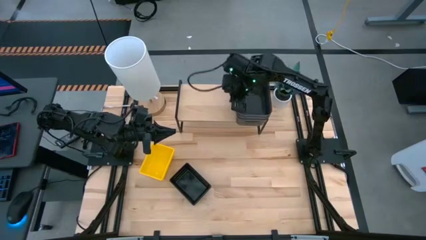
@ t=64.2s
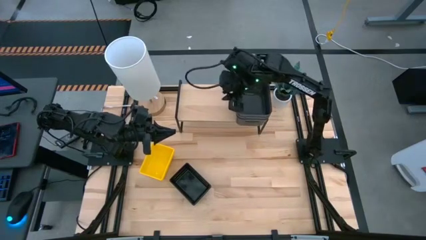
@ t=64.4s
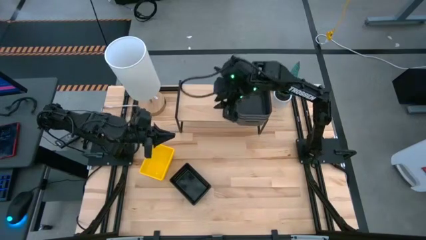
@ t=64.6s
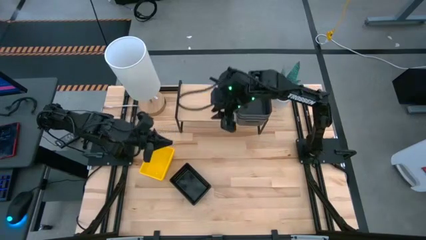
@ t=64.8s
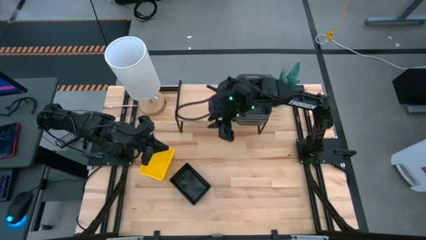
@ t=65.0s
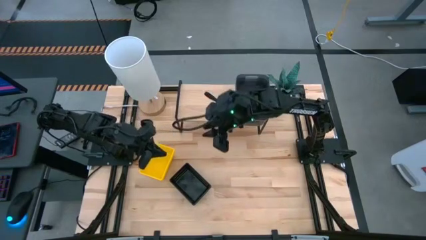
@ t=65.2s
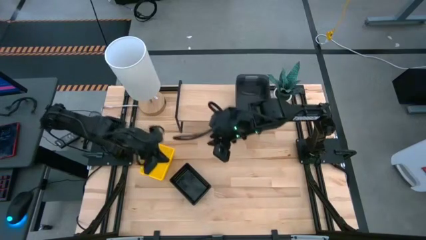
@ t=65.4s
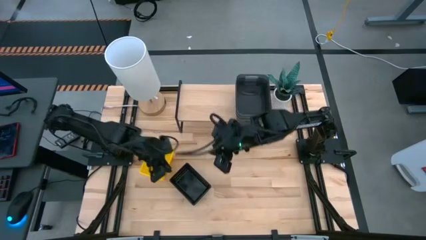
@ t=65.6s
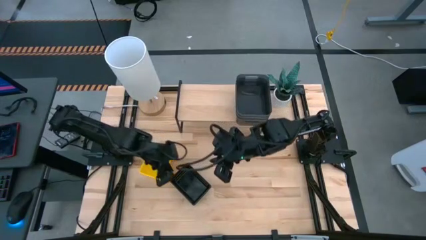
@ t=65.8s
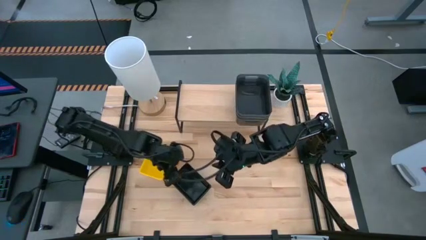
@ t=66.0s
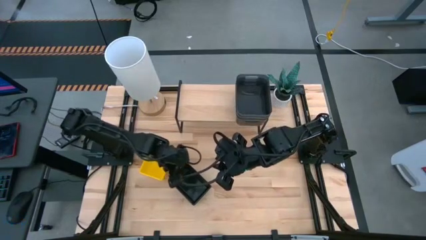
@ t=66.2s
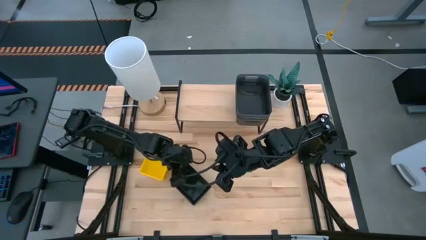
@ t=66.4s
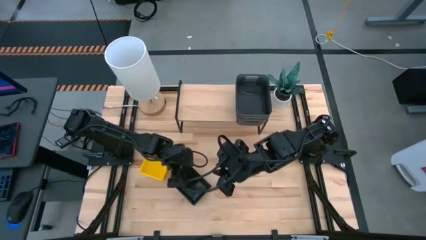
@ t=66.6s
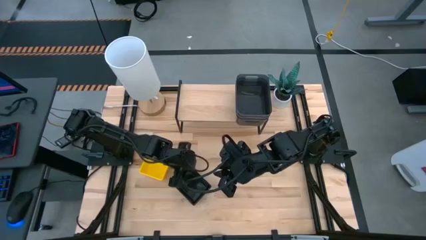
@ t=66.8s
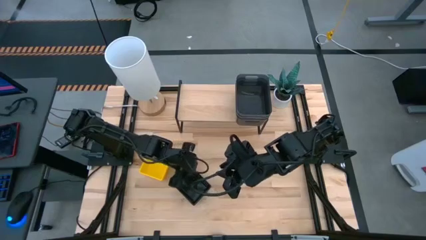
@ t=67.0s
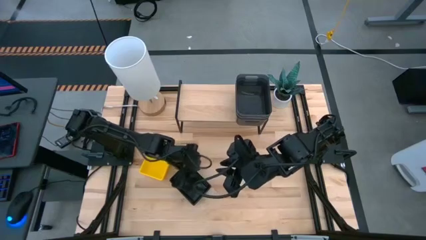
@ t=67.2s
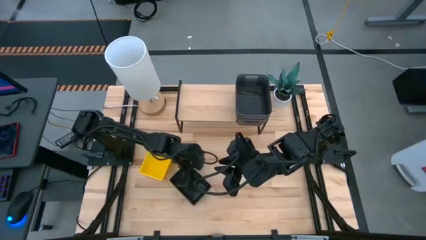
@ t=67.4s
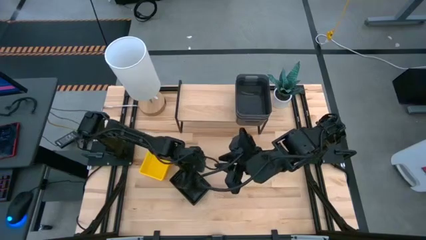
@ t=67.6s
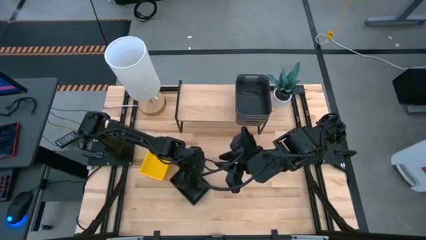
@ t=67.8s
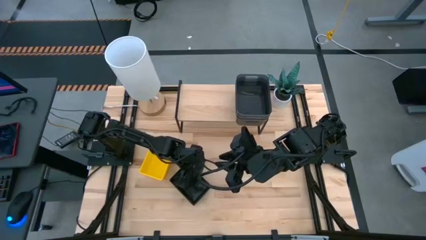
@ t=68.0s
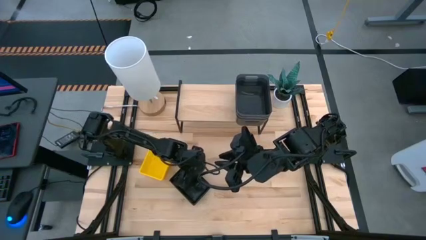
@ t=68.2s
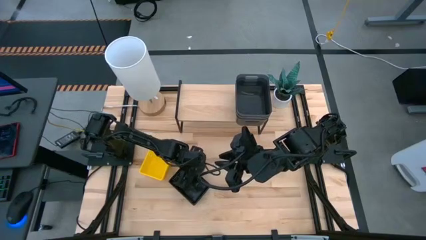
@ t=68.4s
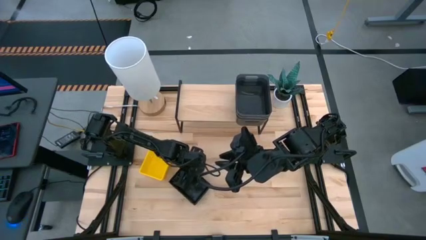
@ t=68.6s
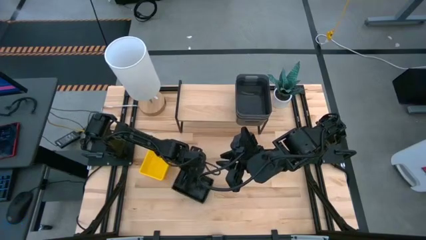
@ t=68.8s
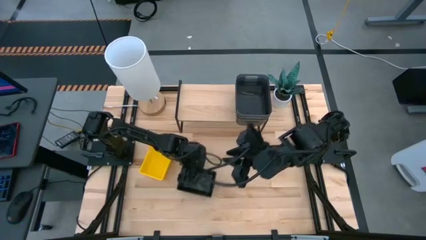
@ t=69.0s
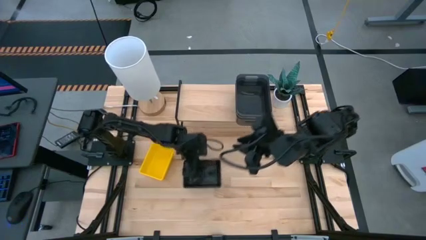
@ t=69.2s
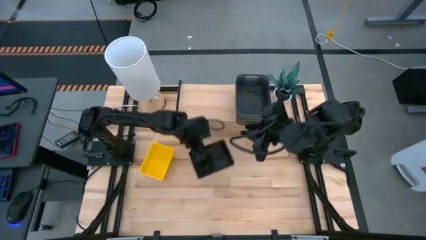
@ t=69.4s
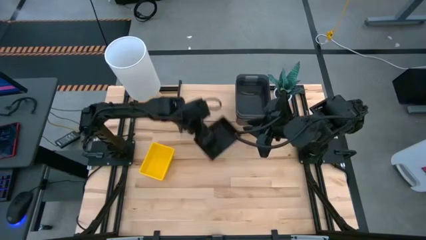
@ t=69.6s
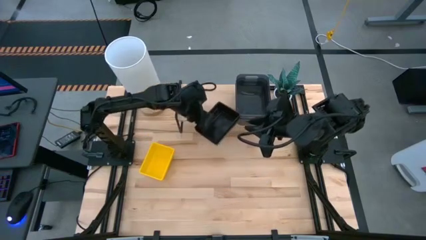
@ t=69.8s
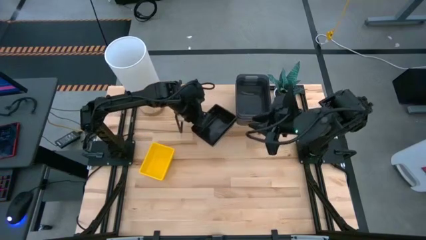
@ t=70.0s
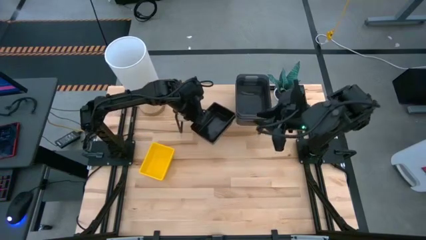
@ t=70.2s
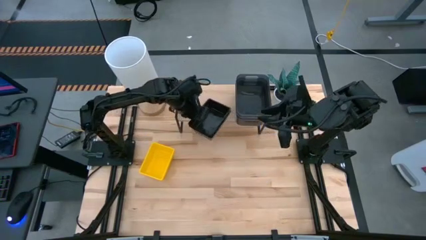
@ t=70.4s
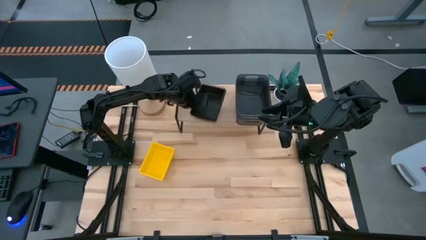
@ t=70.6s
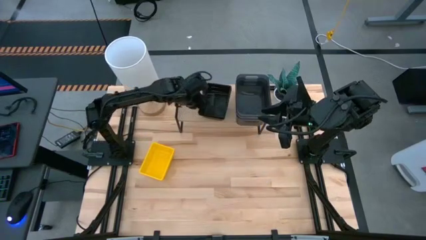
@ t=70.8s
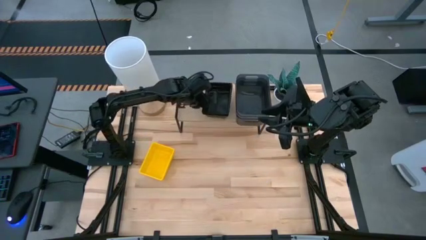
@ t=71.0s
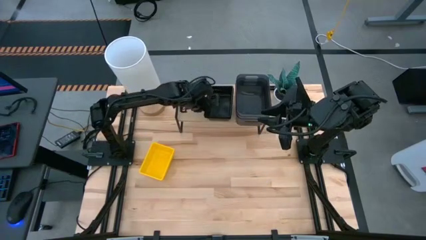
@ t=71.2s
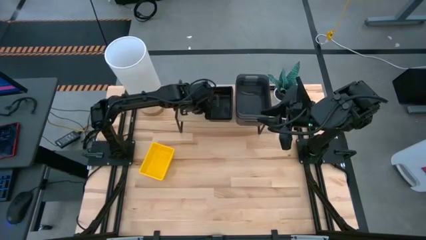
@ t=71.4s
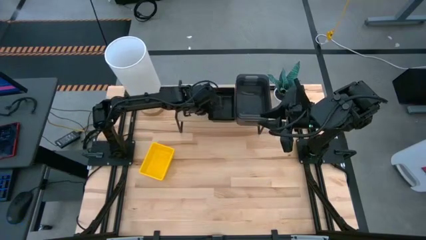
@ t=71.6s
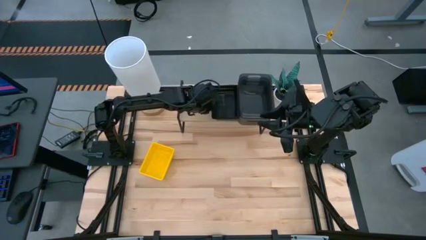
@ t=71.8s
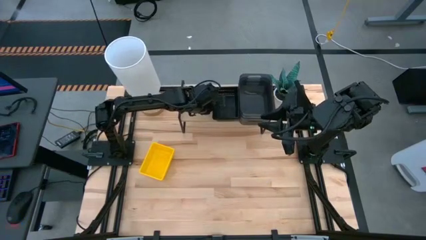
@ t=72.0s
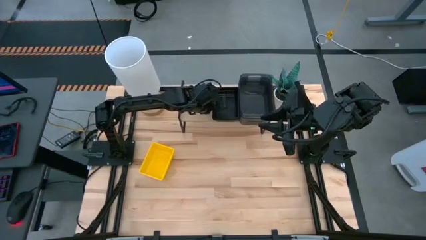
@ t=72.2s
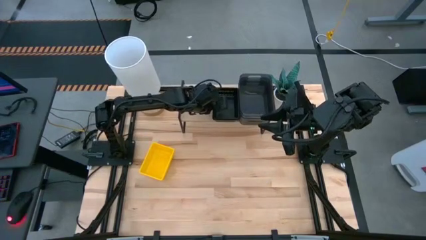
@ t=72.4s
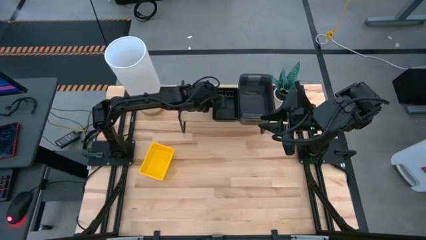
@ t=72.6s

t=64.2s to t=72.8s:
Task: Stack baskets on shelf by color
Put the stacked black bins on the shelf

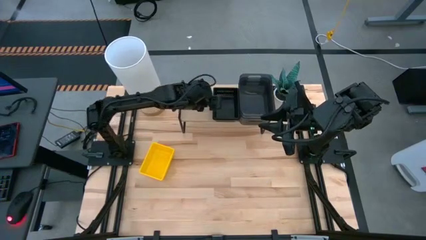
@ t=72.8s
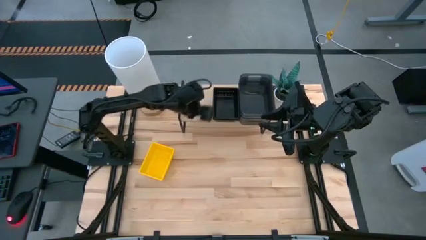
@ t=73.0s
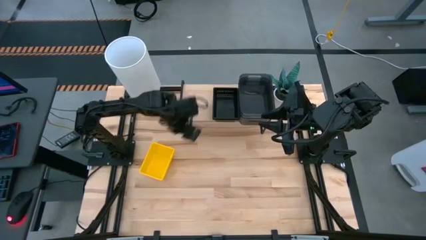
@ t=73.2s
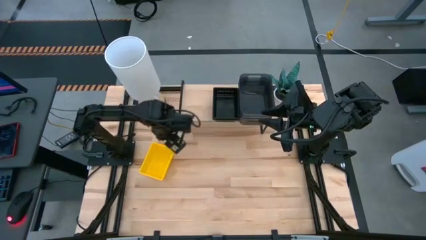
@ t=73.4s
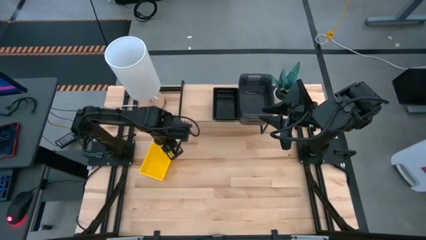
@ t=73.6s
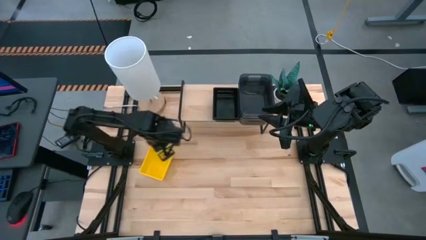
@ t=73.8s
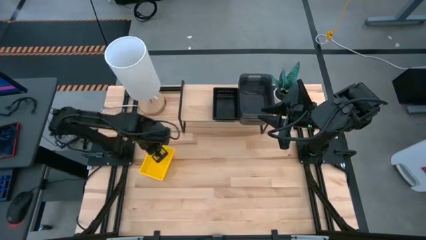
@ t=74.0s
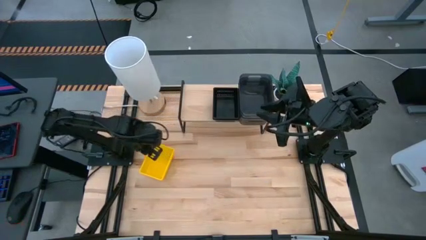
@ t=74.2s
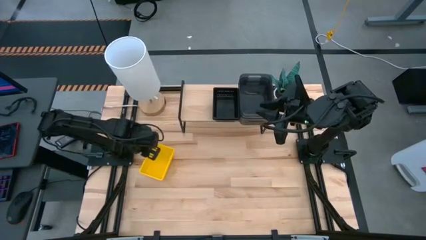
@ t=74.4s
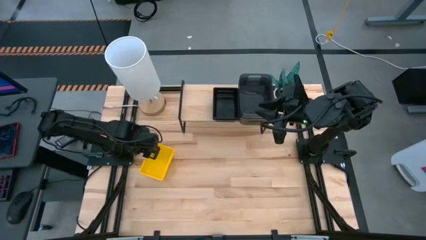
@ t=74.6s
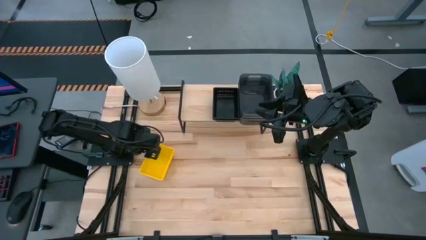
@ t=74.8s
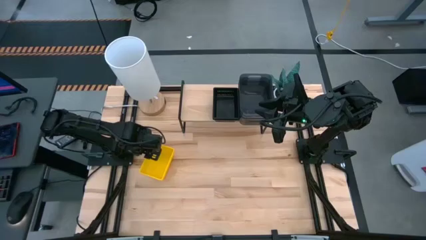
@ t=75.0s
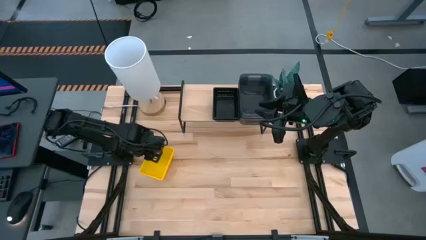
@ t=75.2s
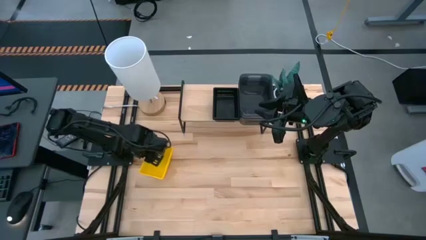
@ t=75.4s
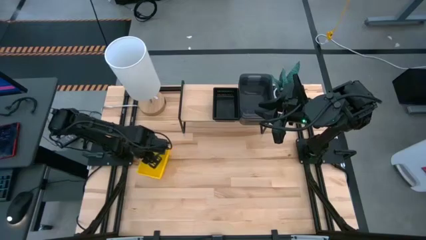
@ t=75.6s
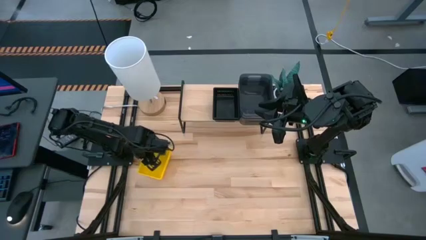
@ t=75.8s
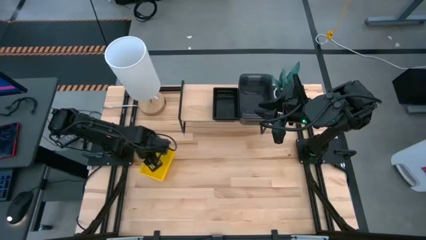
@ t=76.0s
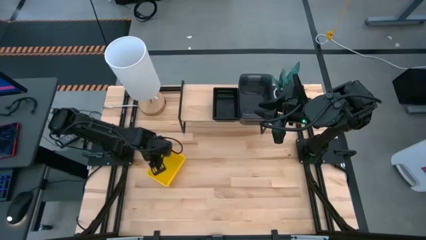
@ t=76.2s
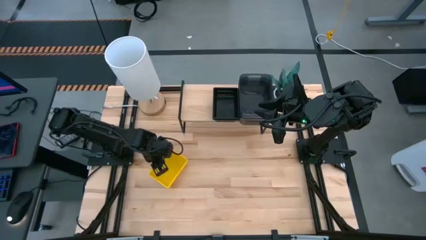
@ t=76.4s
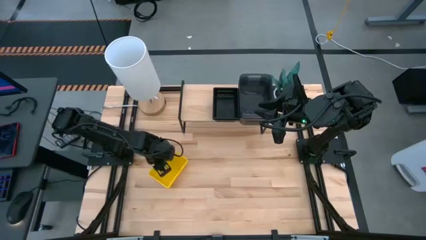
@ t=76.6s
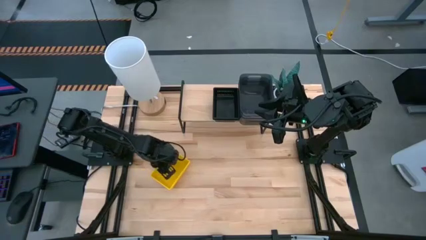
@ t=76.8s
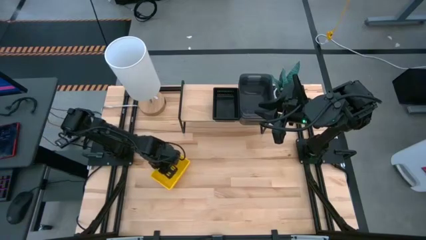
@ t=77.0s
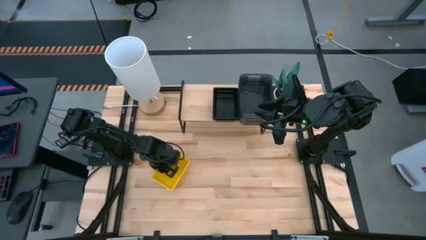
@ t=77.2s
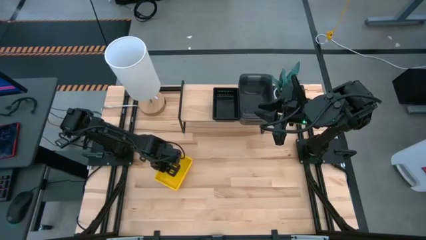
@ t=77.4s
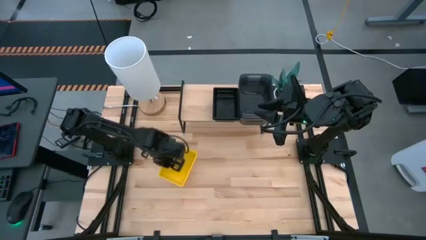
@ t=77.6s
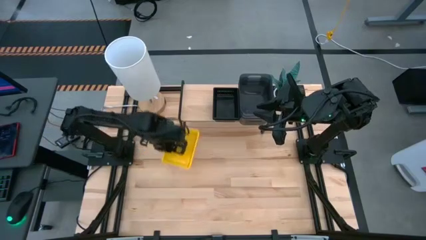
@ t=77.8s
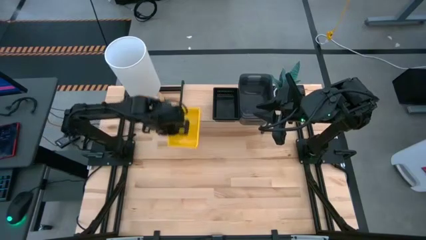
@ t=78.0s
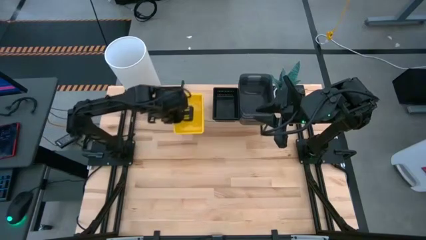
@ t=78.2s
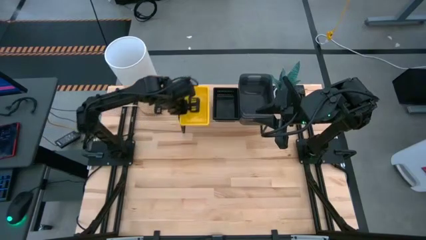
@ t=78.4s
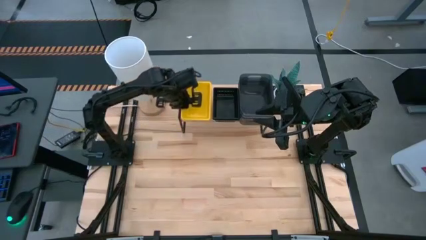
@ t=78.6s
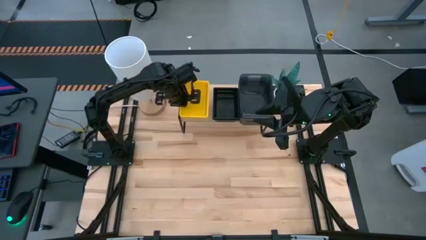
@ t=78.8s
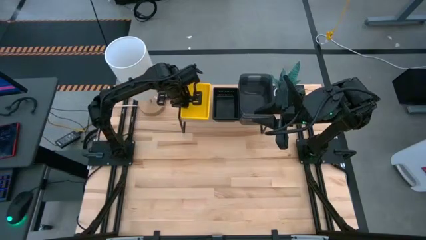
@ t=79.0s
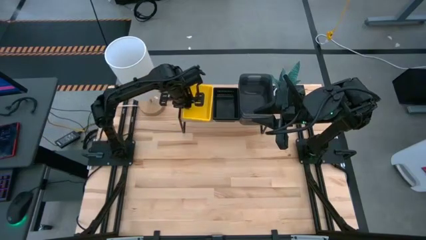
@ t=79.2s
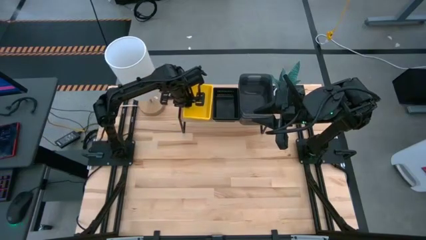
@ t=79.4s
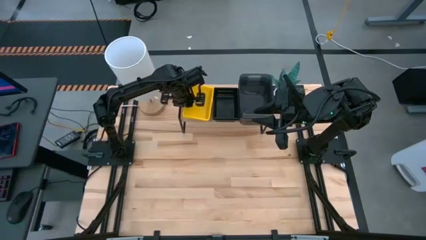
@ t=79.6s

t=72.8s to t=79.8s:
Put the stacked yellow bins on the shelf
